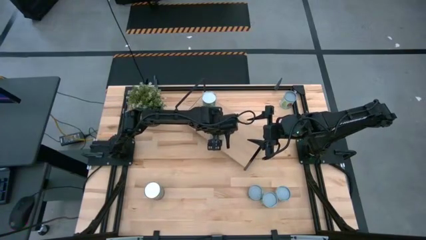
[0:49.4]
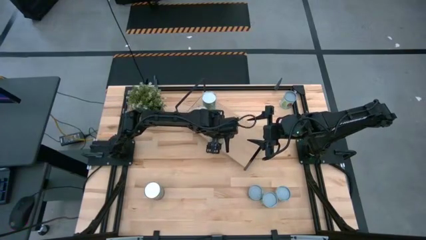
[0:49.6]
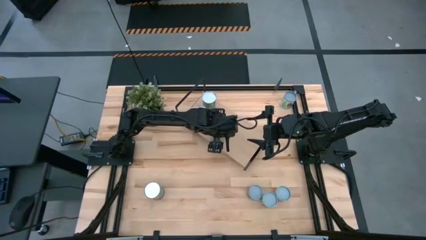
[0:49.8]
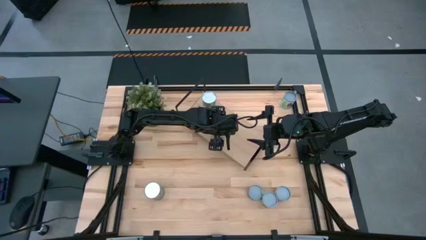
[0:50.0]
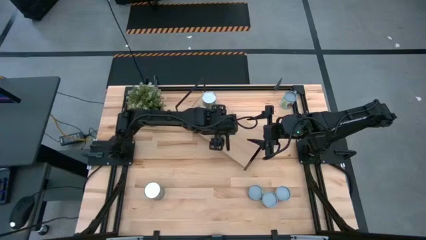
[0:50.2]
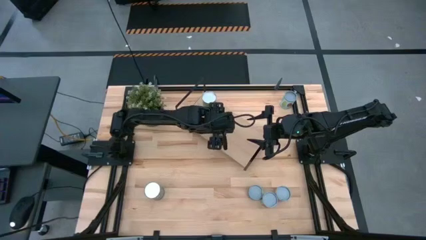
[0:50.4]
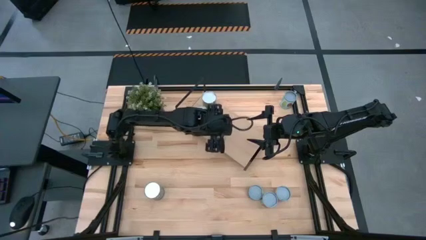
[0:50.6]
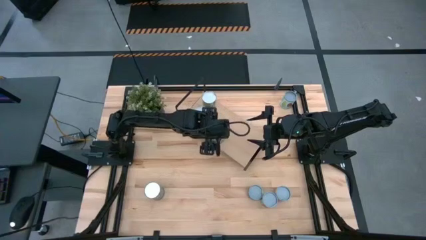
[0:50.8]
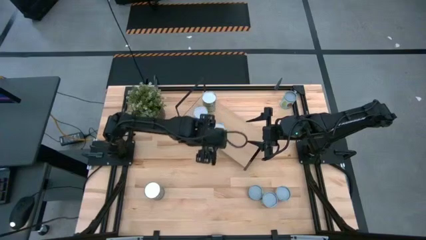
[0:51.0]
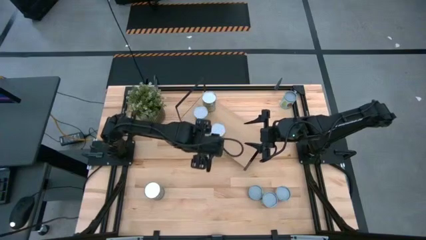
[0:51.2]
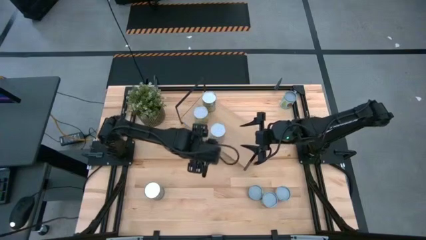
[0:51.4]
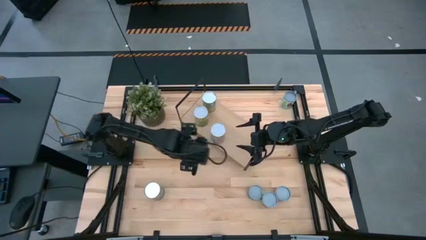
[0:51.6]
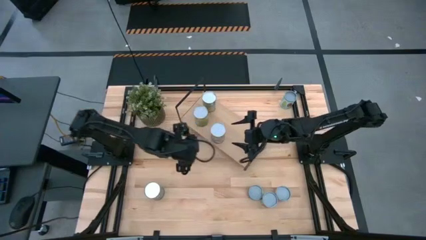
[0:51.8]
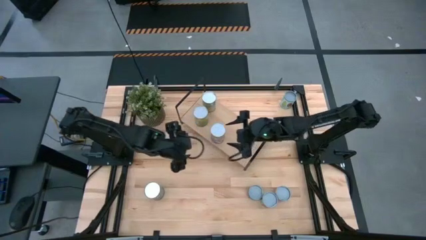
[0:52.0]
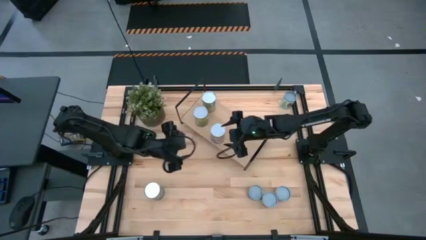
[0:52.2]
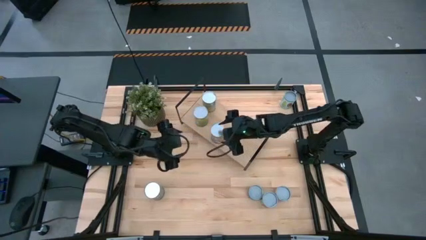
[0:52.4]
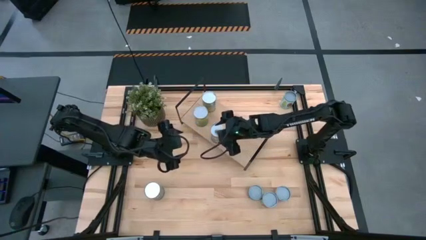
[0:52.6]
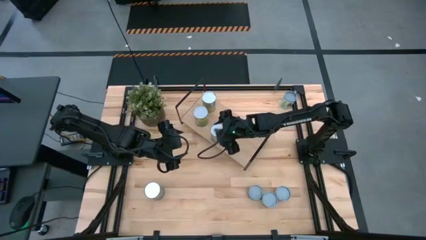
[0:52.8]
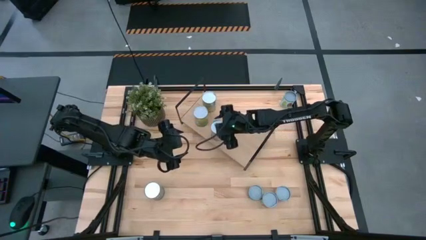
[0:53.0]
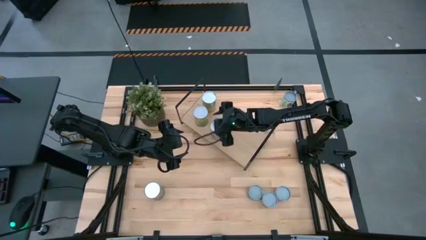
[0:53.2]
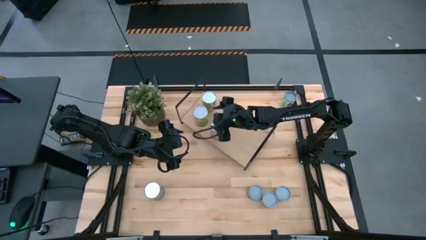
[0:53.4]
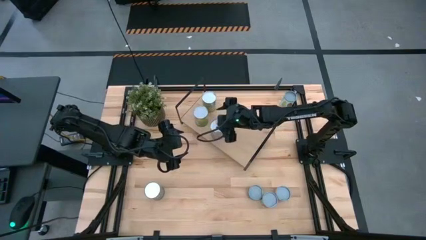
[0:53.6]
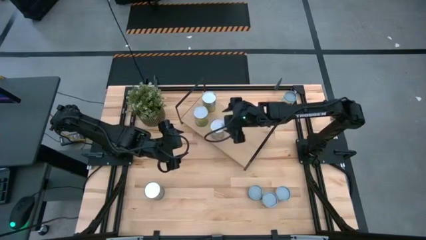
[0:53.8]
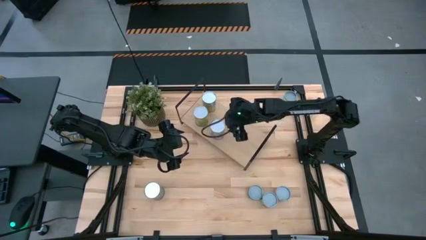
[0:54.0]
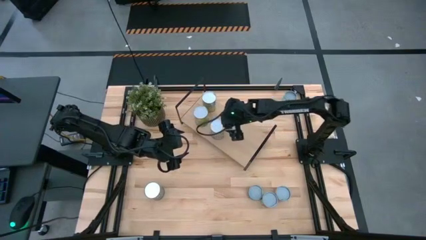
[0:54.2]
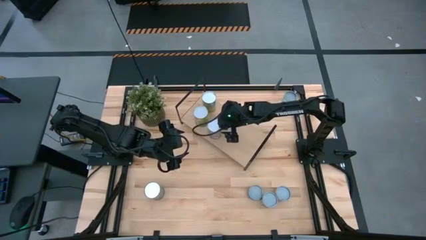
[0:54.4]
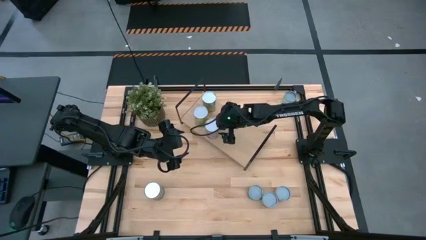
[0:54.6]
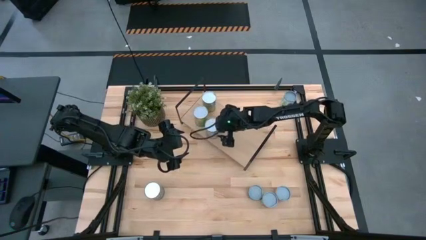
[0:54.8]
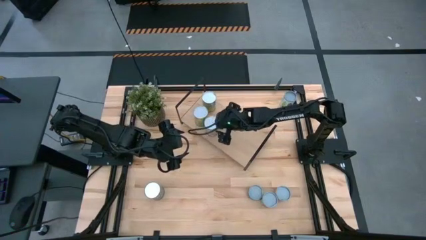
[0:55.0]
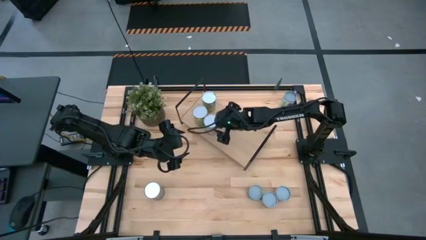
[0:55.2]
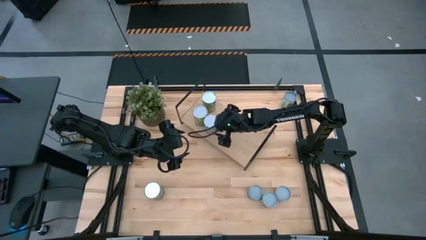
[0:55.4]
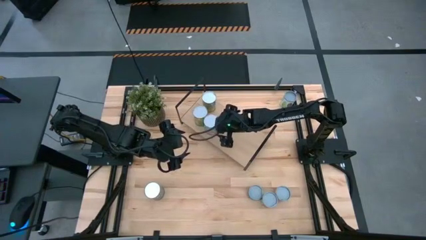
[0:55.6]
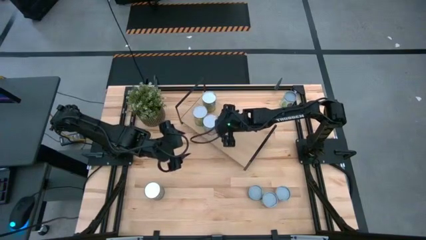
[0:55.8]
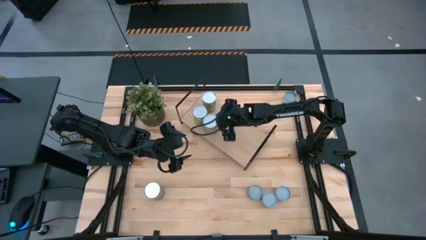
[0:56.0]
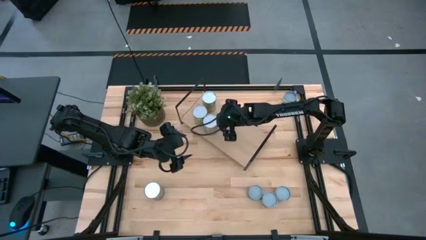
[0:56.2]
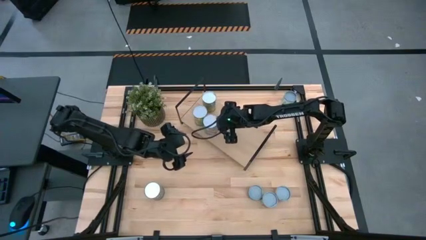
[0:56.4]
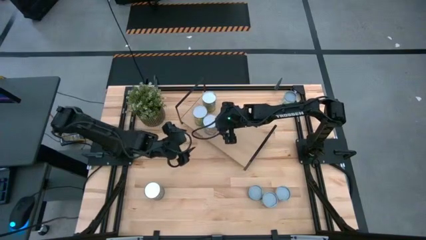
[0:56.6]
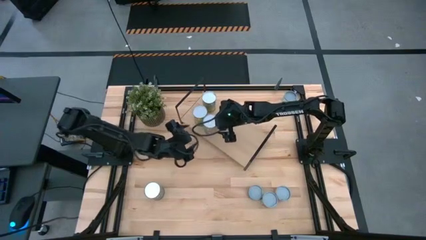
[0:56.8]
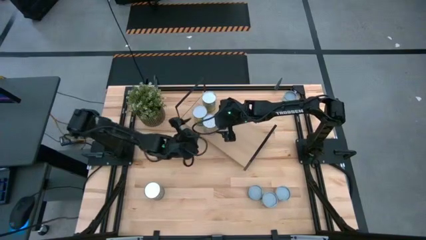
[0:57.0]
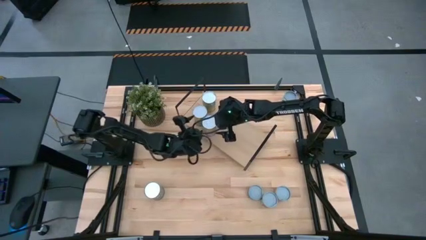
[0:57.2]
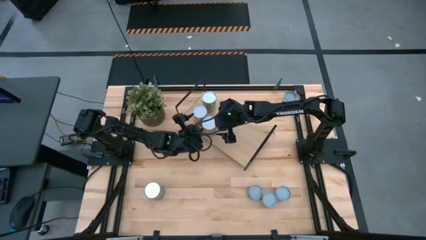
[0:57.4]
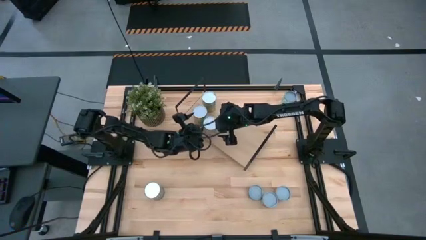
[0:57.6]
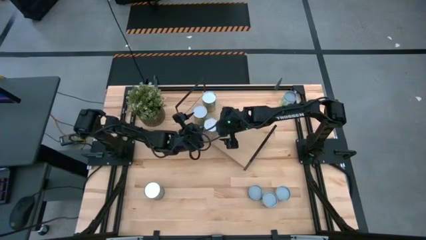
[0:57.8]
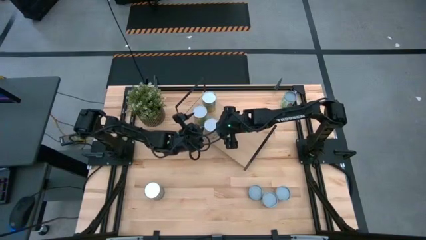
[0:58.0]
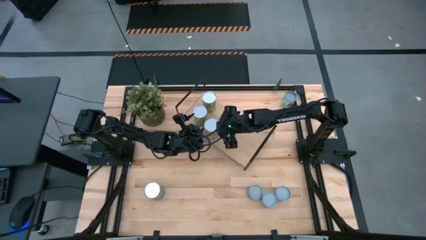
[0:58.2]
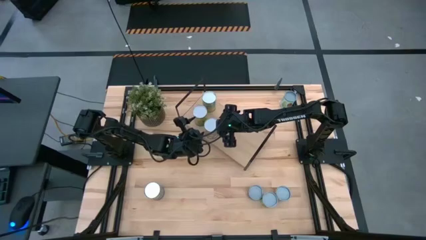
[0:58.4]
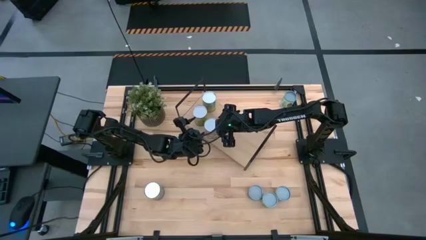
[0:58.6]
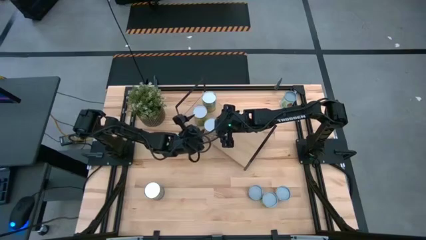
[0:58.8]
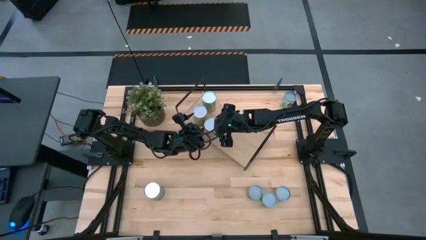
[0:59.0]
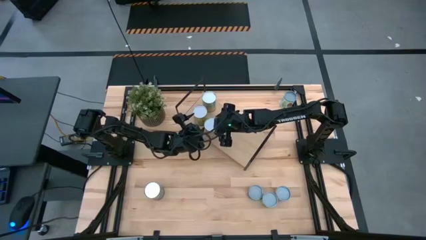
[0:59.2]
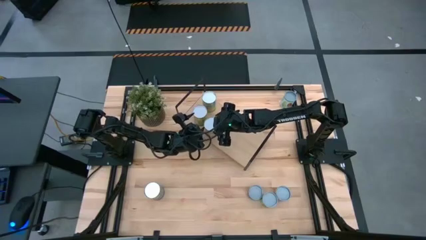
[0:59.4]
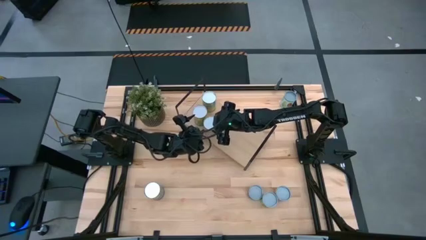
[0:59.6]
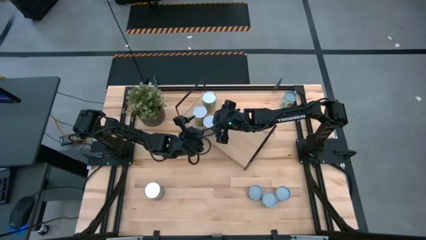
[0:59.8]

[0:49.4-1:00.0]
Task: Pick and place cans onto a shelf
Put the canned peaches on the shelf

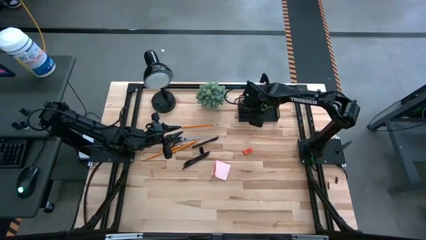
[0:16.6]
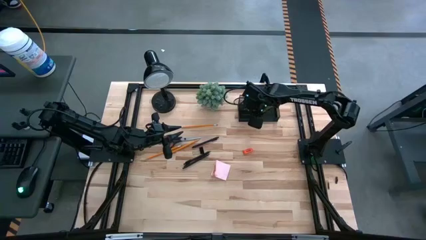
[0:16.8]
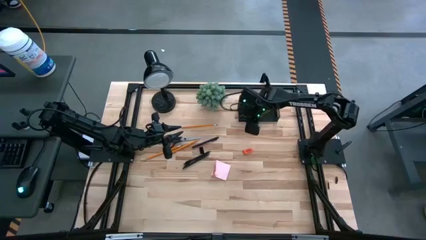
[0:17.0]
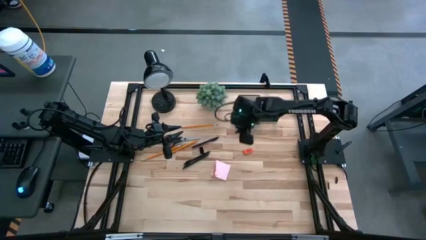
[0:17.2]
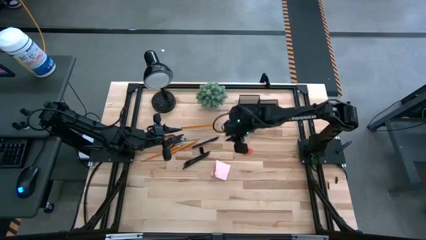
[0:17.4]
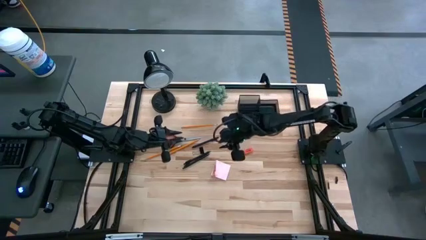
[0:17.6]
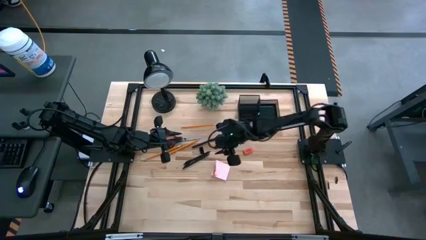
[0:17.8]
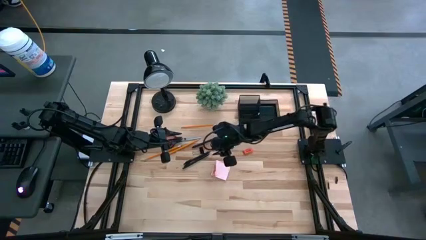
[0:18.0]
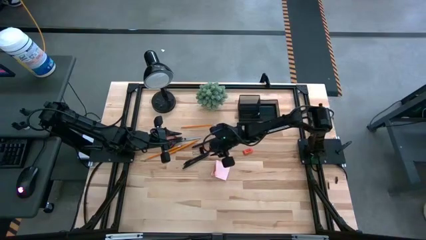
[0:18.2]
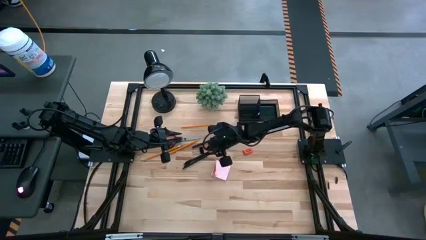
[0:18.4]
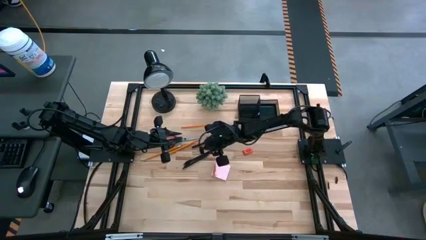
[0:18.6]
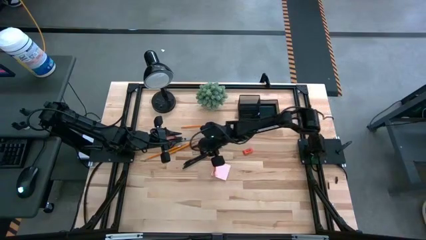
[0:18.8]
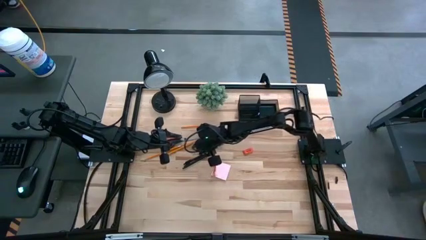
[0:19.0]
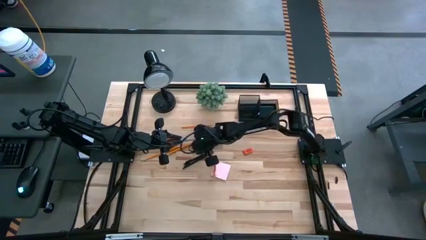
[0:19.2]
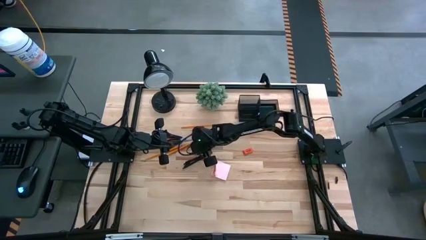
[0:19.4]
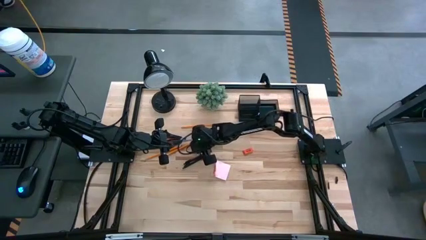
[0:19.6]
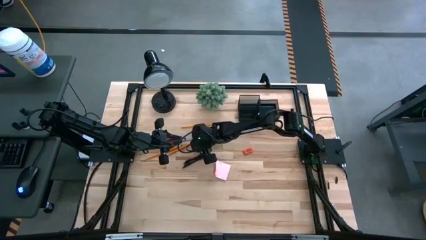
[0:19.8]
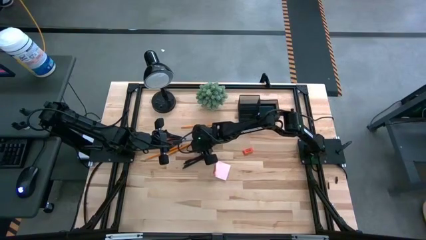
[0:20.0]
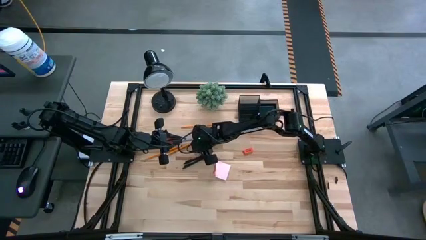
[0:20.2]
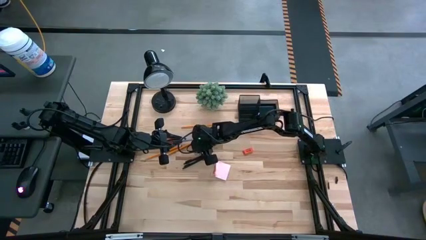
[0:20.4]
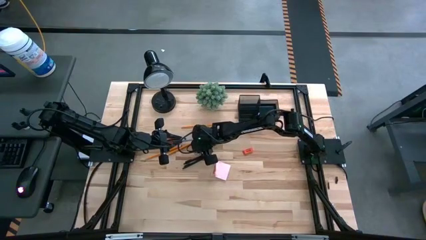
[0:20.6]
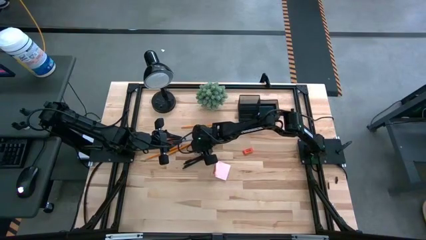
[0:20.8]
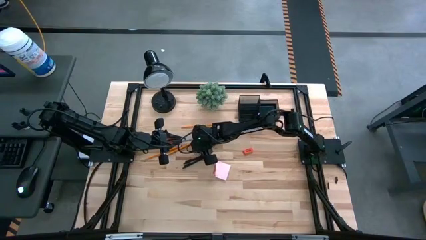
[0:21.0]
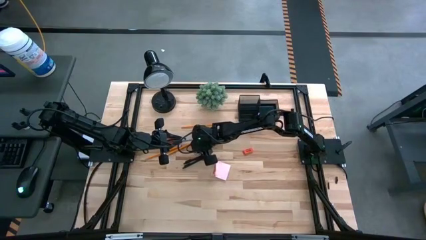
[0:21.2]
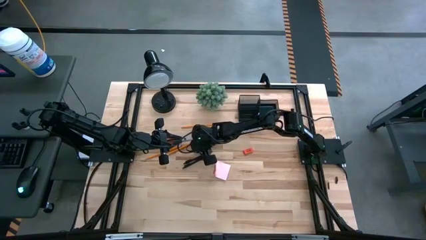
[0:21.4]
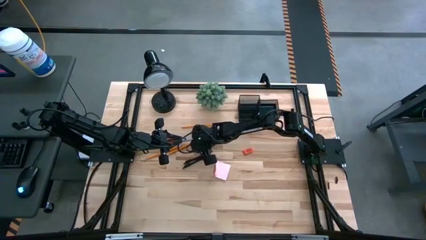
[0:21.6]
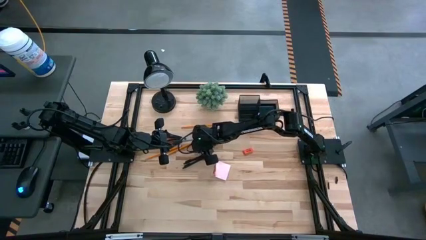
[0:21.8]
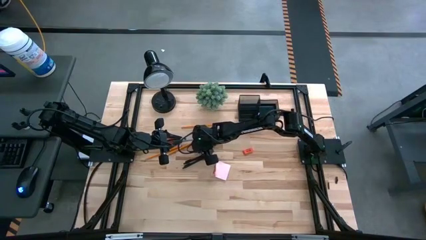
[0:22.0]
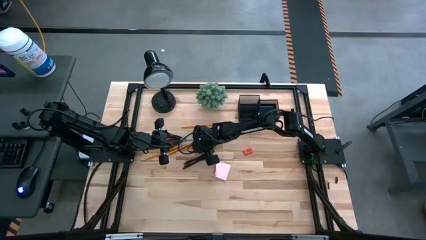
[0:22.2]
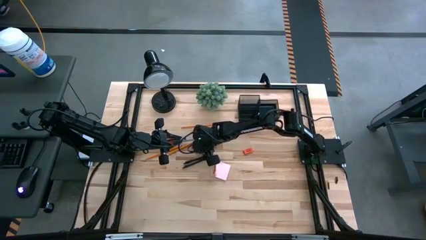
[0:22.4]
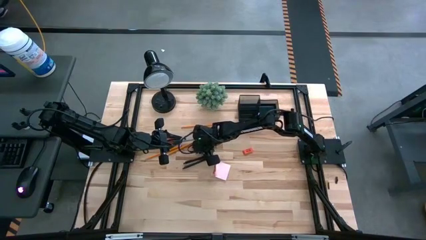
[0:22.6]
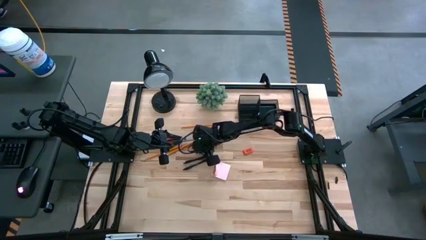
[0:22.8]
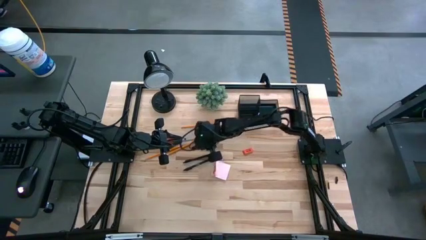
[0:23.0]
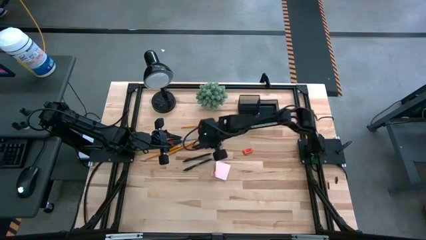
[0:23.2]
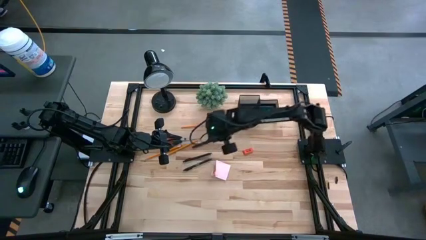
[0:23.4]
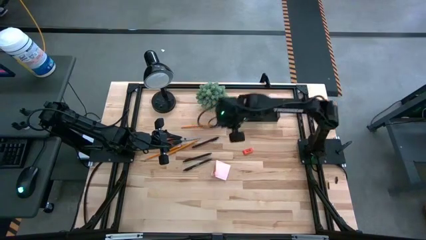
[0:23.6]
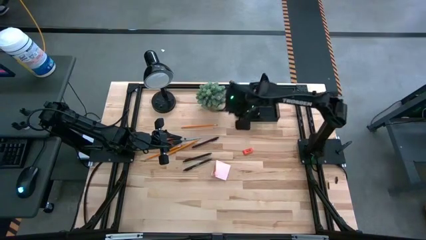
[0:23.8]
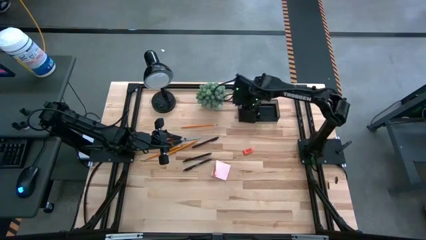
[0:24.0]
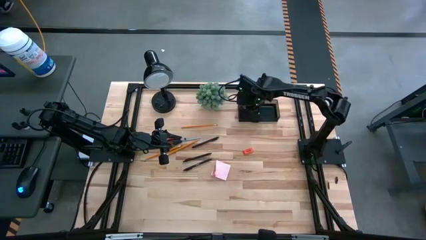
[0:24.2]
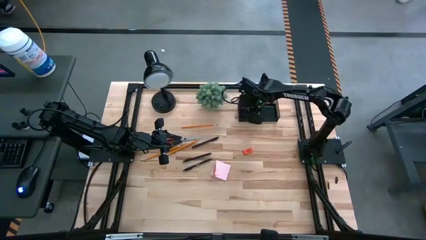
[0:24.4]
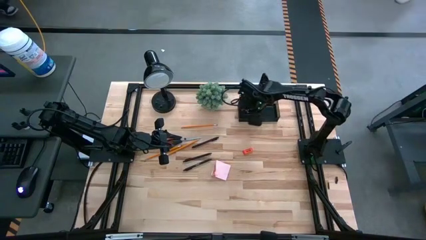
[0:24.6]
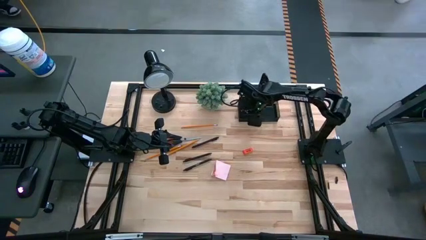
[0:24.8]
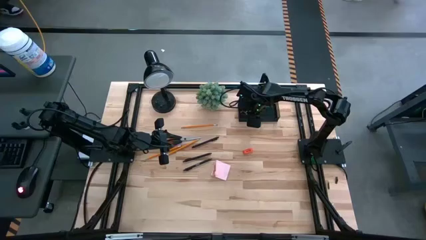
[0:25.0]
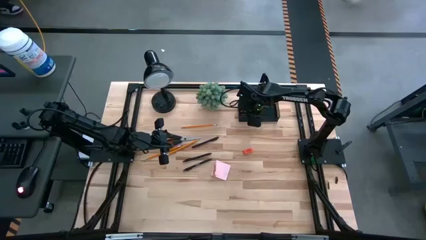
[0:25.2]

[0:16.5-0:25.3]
Task: Pick and place office supplies into organizer
Put the black binder clip into the black desk organizer
